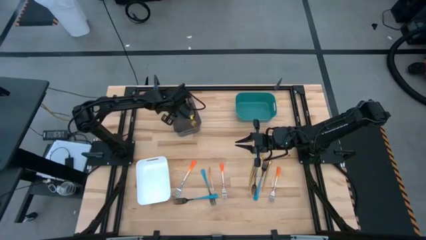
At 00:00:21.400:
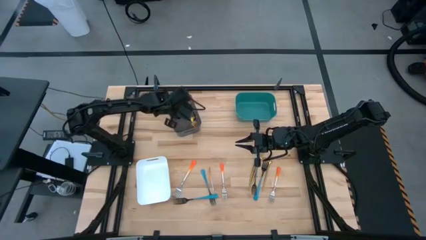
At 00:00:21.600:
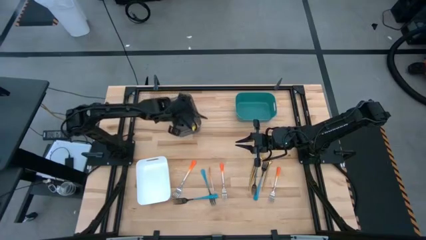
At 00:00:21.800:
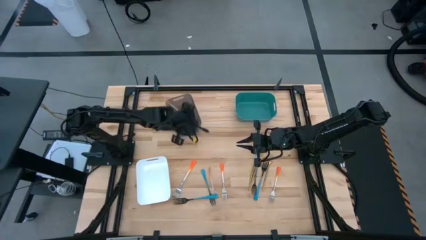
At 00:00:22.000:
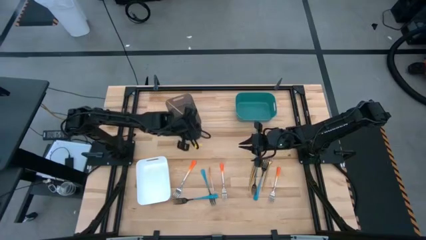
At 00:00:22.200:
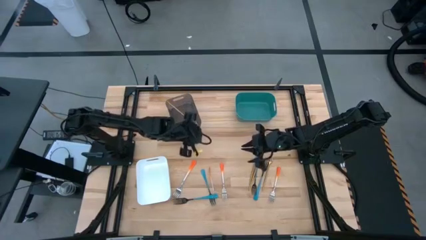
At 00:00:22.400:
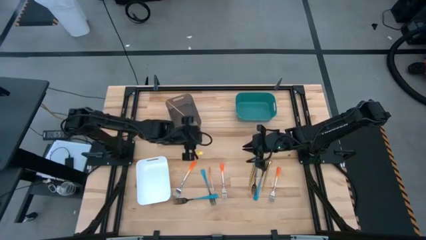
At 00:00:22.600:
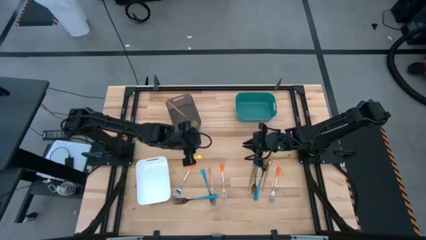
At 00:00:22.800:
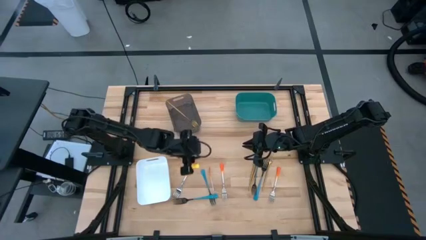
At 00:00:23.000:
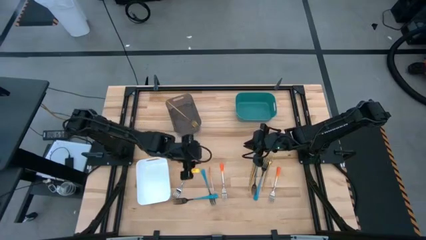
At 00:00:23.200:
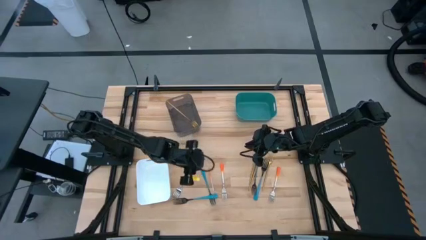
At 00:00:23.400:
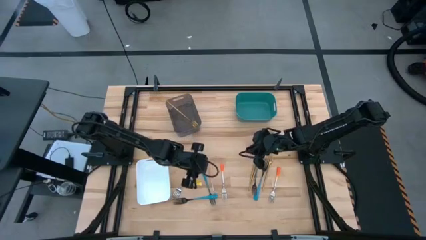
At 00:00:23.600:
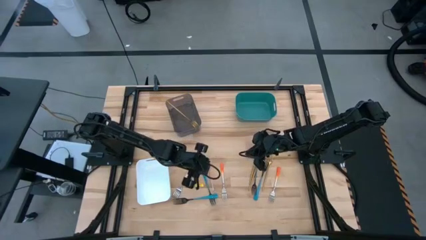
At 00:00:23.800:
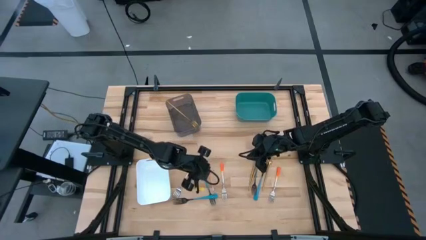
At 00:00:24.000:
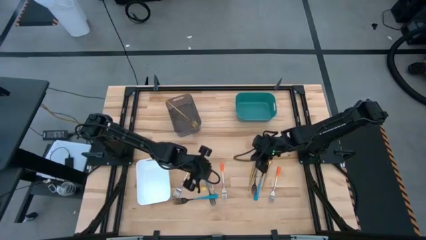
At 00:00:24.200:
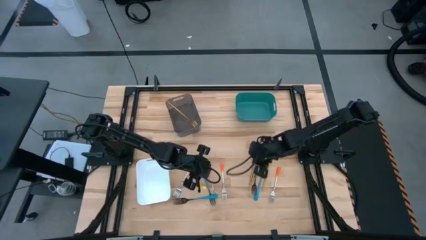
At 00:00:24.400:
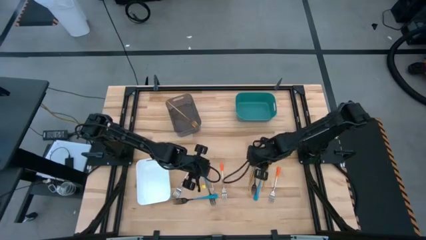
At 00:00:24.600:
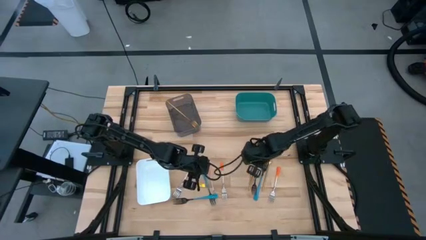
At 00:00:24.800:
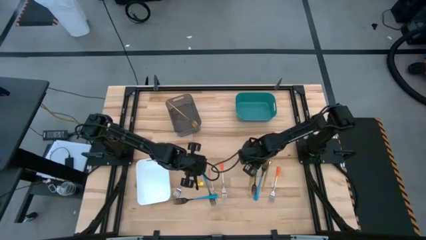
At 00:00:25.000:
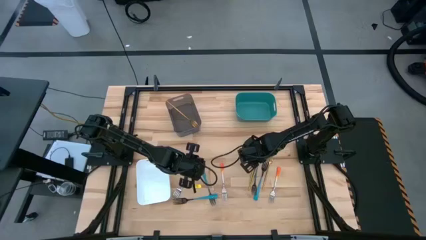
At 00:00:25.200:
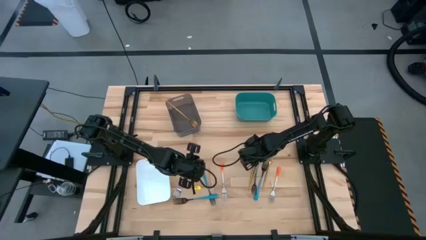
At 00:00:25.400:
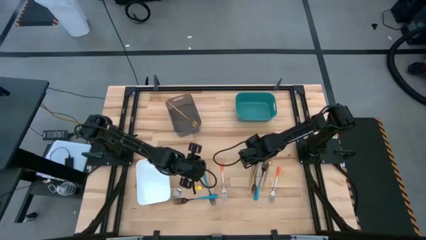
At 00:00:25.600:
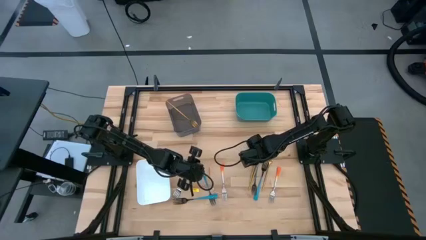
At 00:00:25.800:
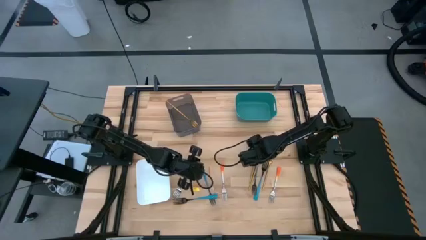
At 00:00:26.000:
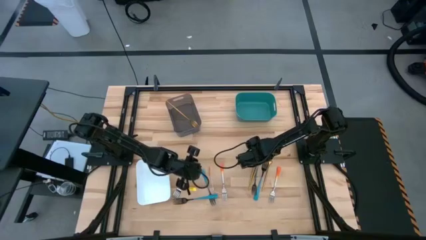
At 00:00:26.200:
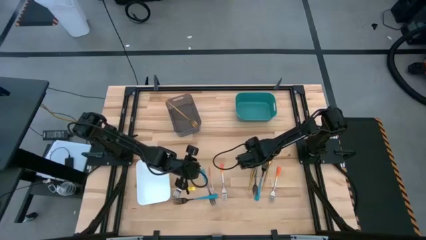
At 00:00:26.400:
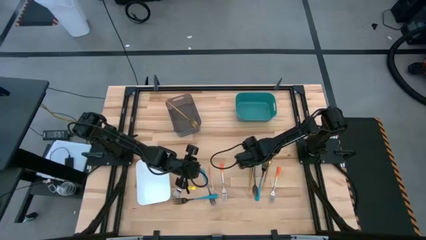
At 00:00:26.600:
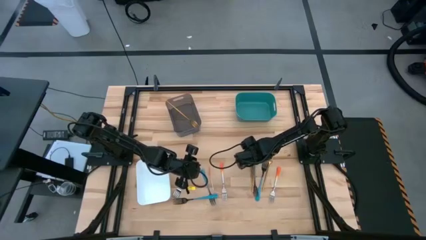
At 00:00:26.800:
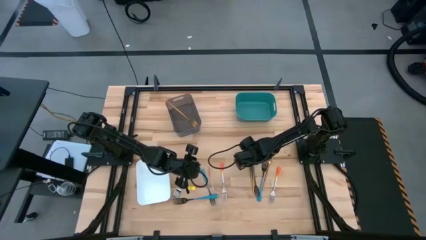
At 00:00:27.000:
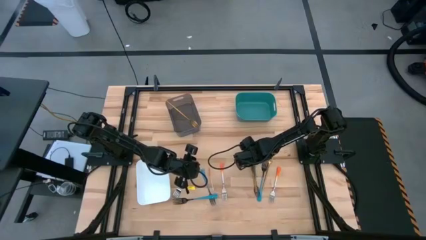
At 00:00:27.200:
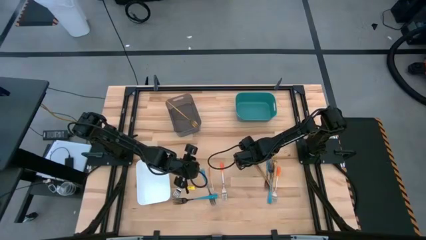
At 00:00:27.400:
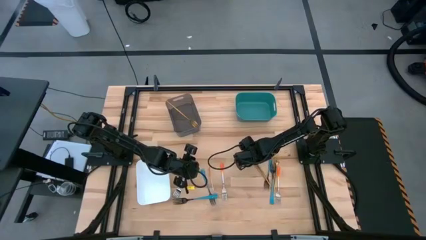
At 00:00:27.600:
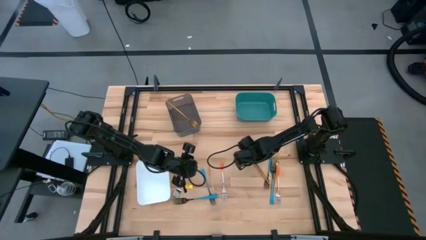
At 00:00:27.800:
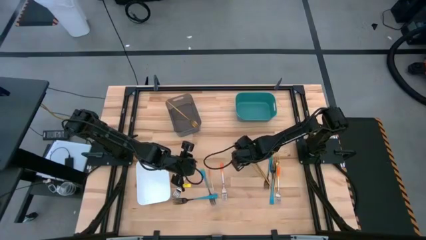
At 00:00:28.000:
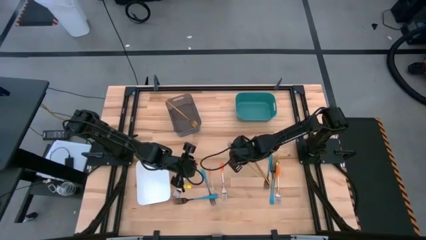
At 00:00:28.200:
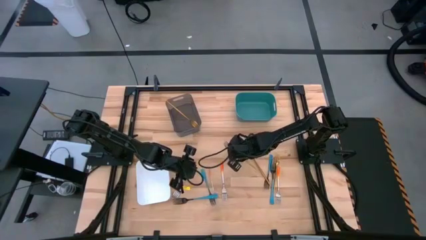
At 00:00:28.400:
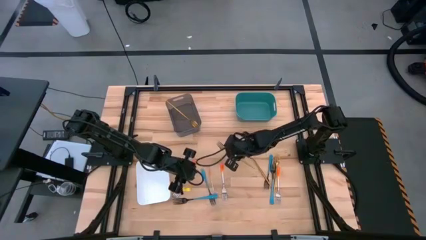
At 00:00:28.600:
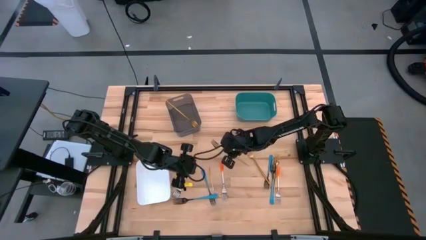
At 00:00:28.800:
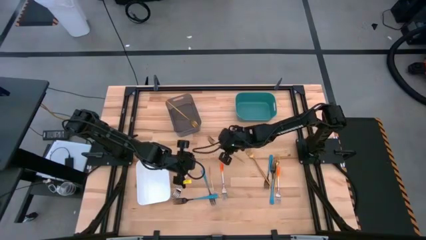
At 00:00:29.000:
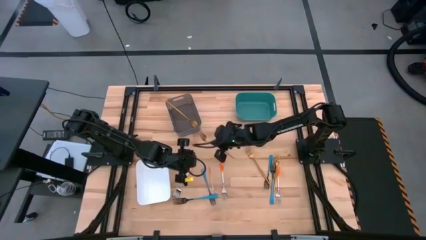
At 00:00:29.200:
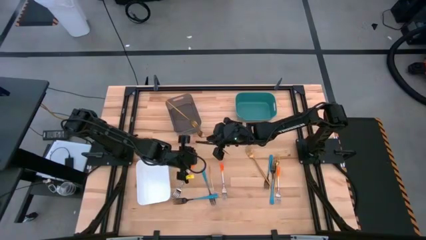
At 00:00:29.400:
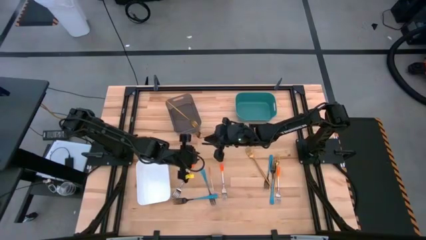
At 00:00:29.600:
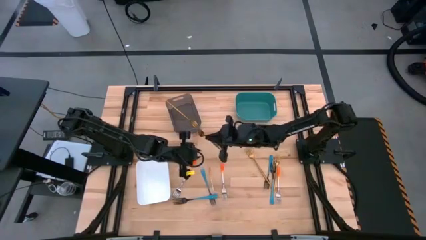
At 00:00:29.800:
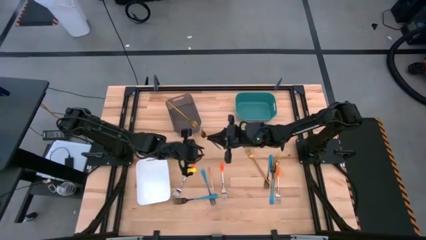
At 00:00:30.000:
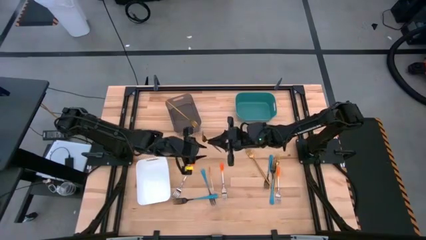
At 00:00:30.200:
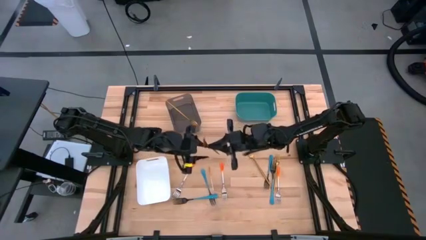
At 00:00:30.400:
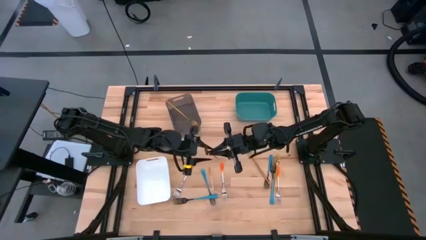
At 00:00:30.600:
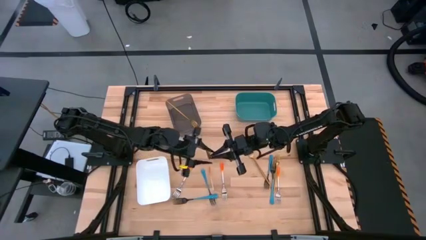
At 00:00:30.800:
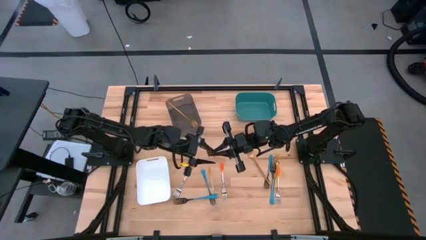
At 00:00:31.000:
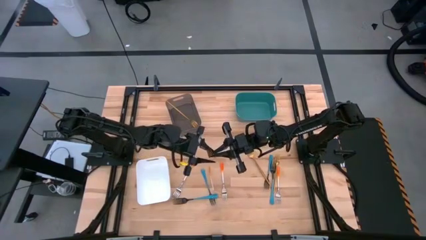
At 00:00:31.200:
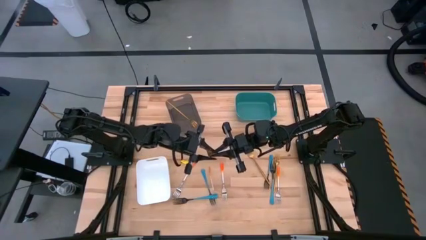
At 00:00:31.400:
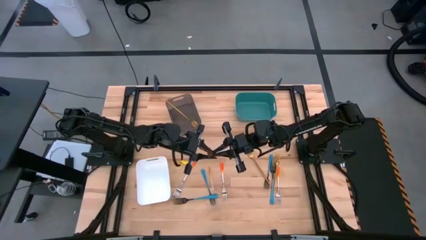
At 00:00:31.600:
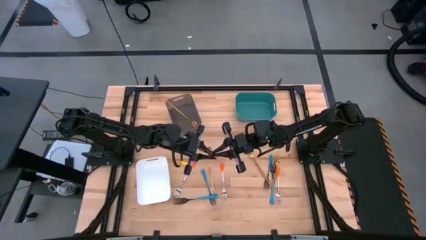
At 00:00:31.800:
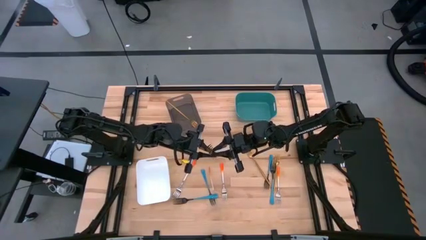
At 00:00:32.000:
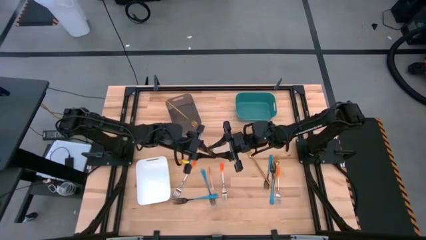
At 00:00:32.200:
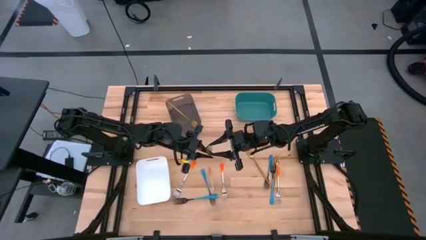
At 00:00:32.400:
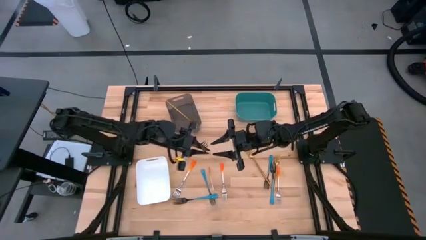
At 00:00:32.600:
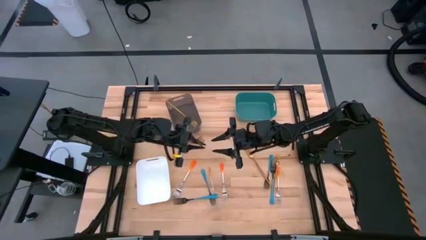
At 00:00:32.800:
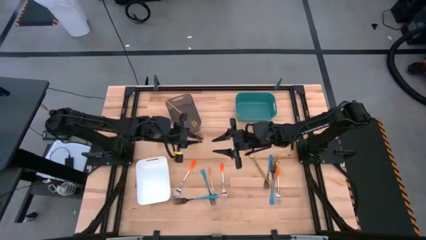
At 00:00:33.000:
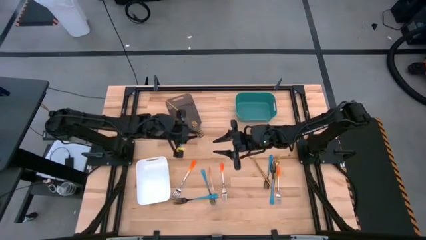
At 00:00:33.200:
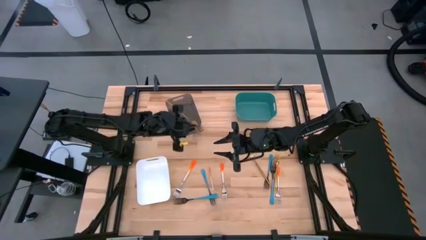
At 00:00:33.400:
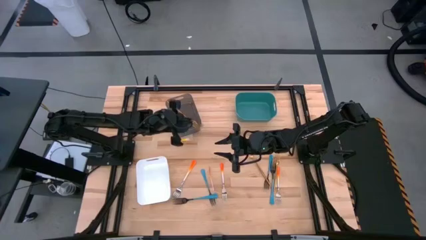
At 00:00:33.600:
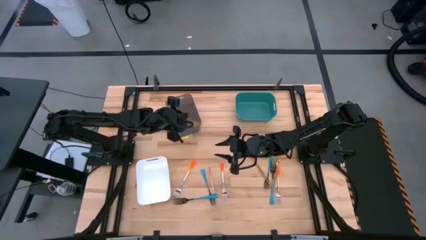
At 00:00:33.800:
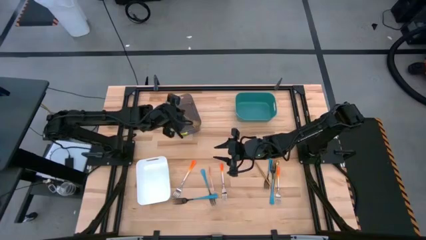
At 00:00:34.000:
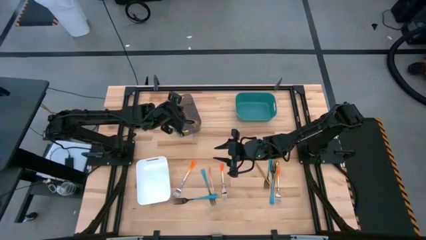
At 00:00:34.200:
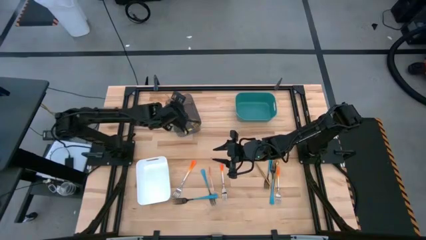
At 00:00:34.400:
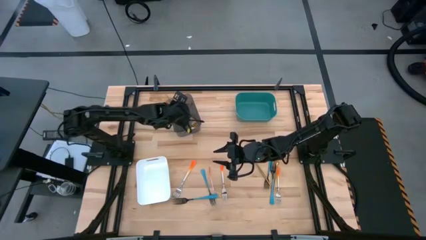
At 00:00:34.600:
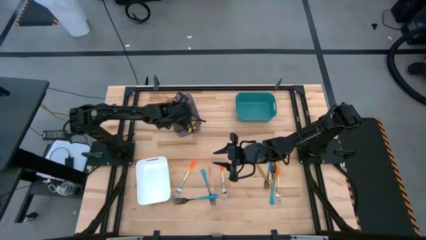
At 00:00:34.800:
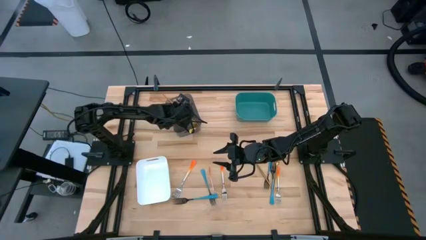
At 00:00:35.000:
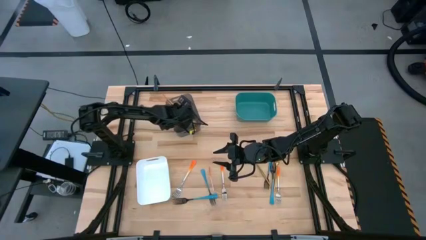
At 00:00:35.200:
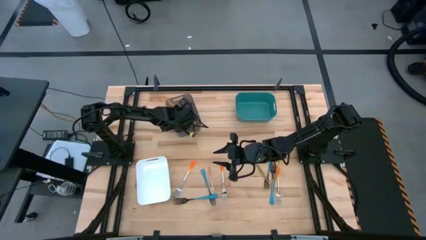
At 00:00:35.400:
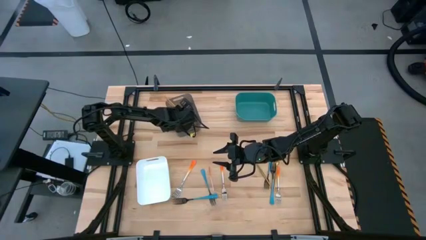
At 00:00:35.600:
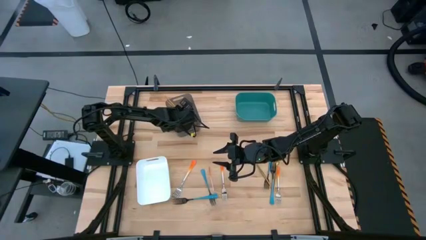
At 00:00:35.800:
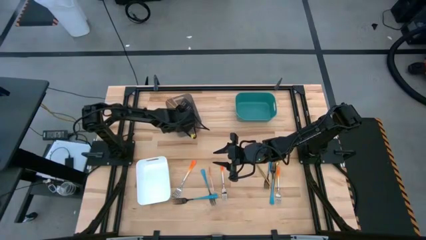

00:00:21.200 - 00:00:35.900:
Task: Sort silverware by color (type)
Put the gold fork into the black bin

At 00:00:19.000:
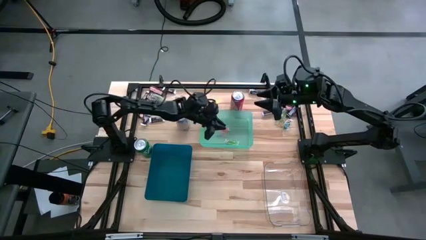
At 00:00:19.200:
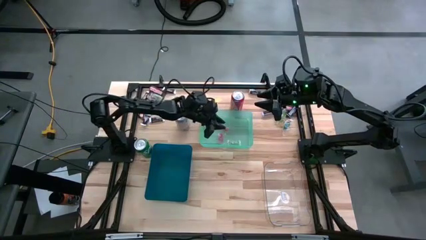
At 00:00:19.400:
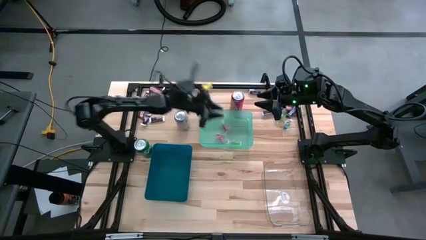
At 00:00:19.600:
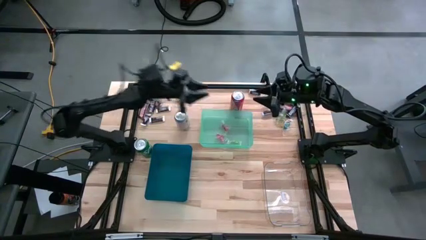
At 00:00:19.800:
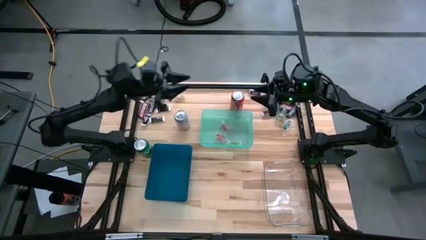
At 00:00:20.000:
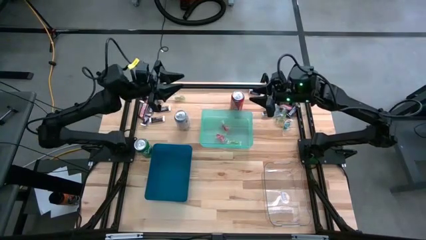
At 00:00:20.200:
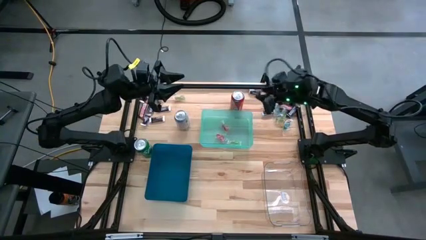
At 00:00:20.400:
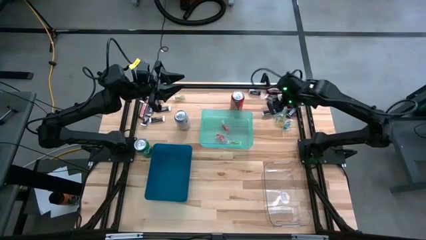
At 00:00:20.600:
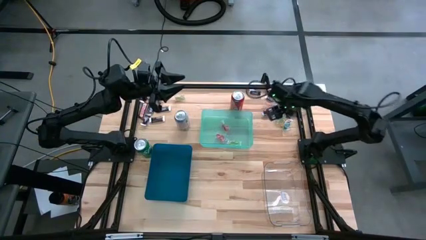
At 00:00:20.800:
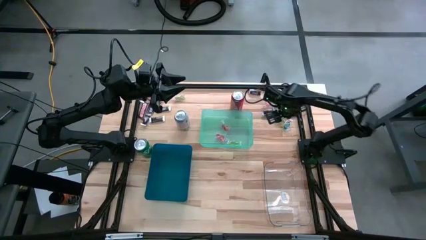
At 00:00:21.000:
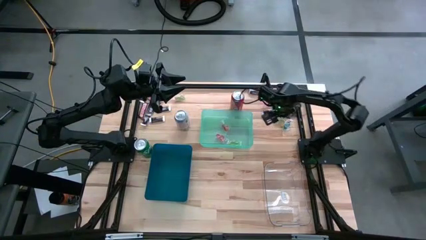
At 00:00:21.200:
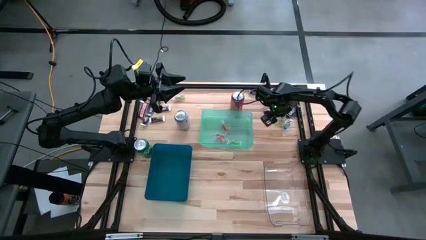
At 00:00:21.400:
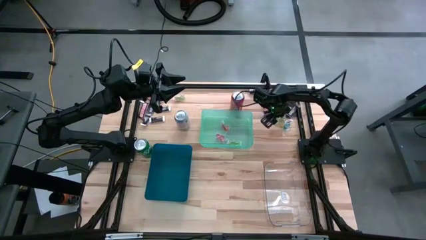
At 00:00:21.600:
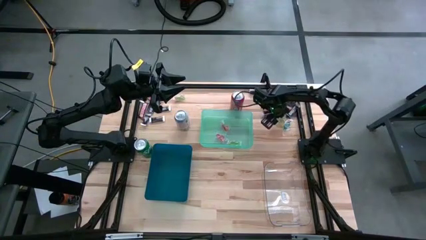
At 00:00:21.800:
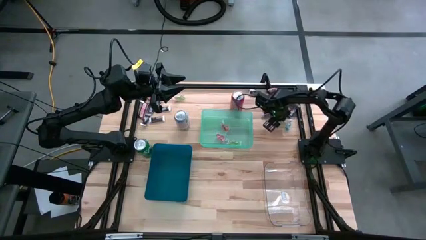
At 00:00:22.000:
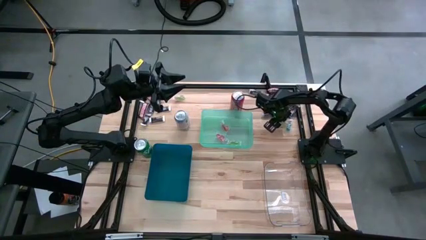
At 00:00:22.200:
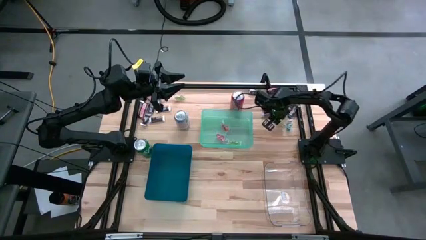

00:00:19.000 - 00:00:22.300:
Task: Organize candy in baskets
Put the green gummy into the green bin
